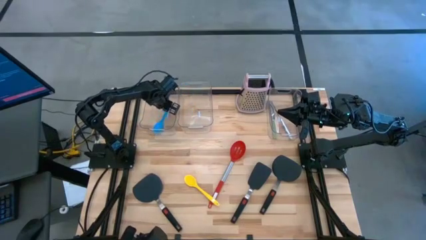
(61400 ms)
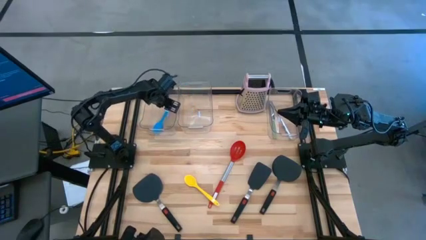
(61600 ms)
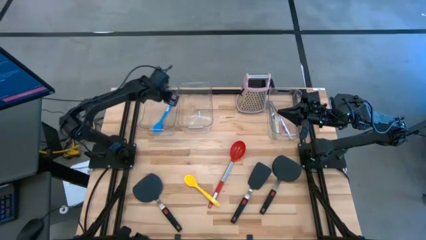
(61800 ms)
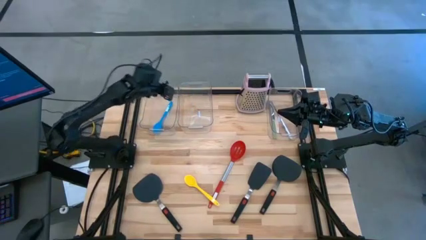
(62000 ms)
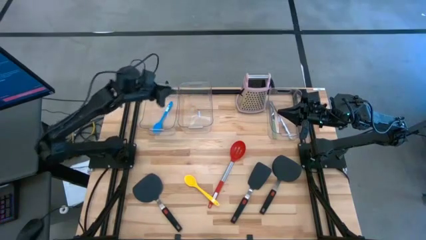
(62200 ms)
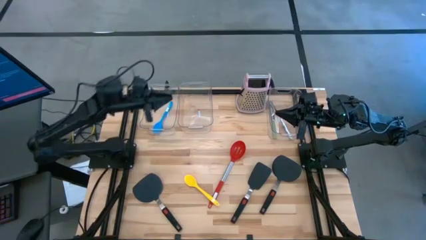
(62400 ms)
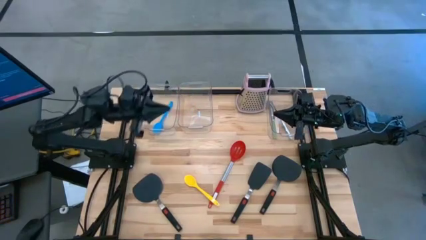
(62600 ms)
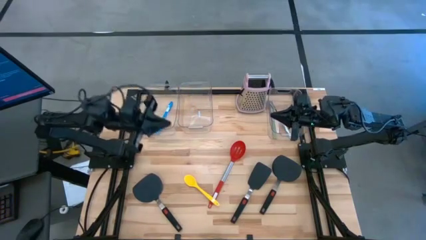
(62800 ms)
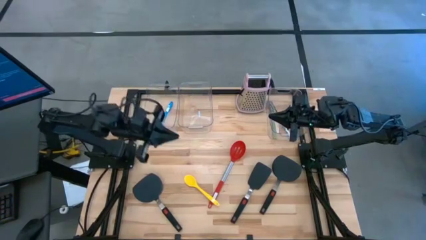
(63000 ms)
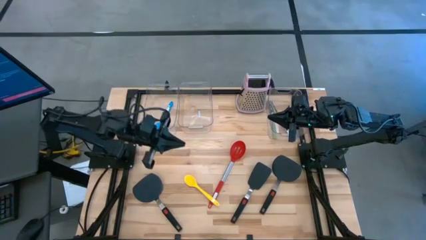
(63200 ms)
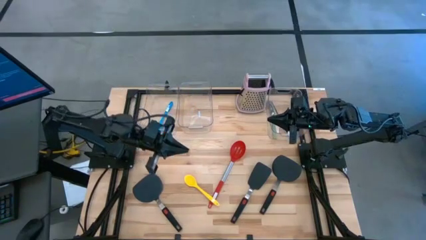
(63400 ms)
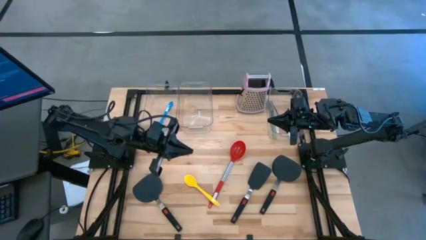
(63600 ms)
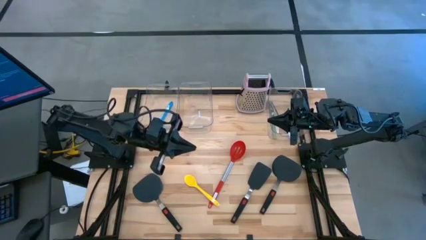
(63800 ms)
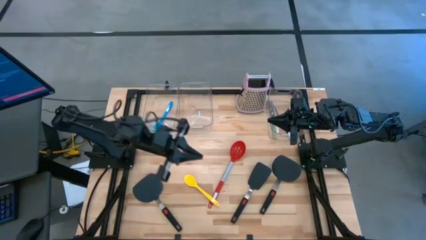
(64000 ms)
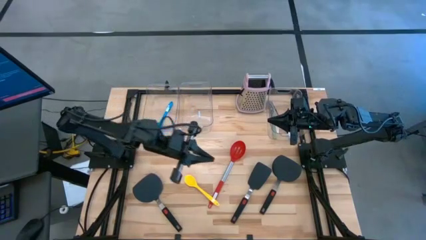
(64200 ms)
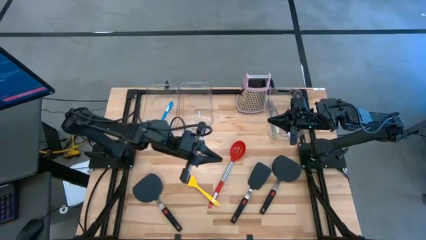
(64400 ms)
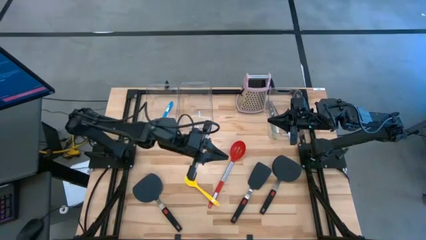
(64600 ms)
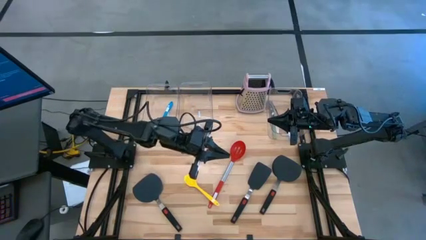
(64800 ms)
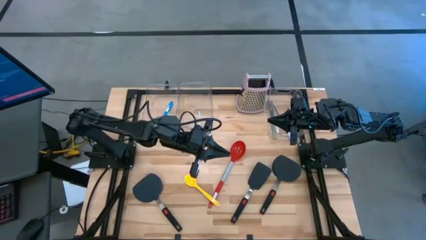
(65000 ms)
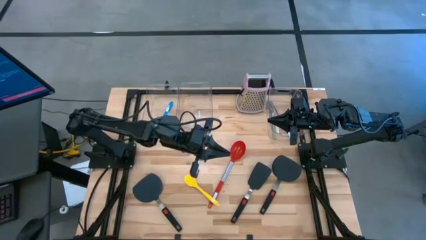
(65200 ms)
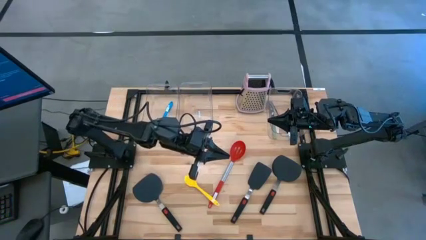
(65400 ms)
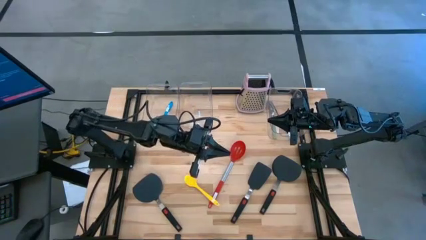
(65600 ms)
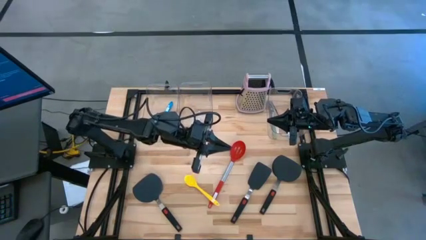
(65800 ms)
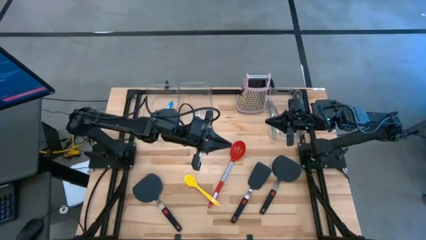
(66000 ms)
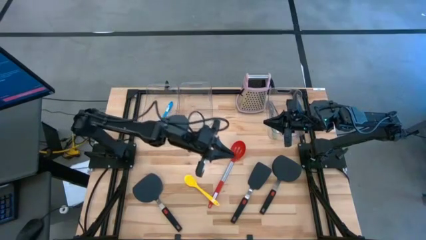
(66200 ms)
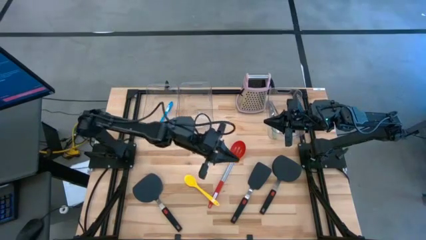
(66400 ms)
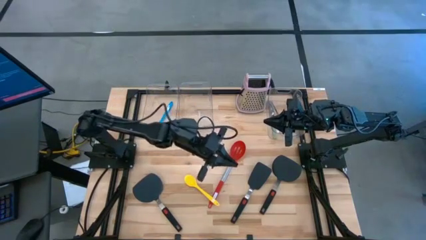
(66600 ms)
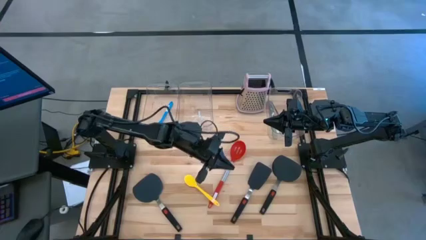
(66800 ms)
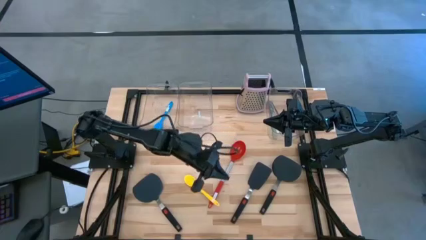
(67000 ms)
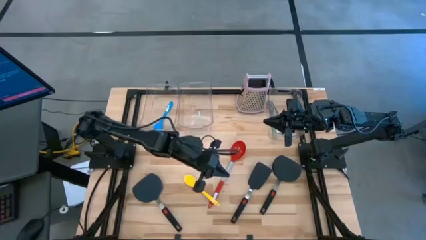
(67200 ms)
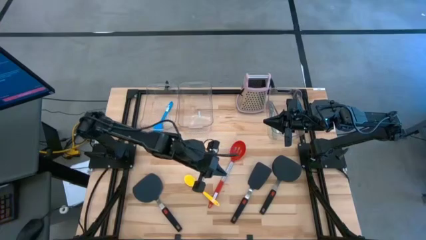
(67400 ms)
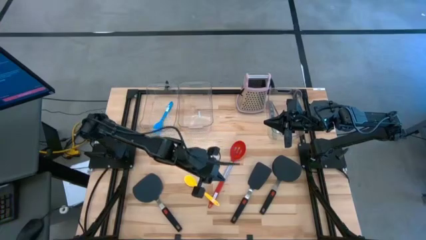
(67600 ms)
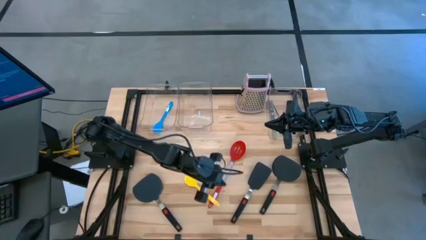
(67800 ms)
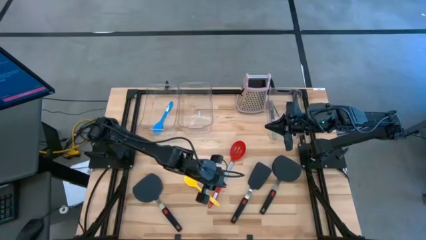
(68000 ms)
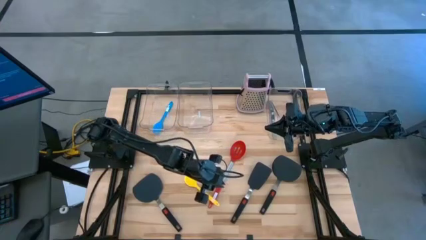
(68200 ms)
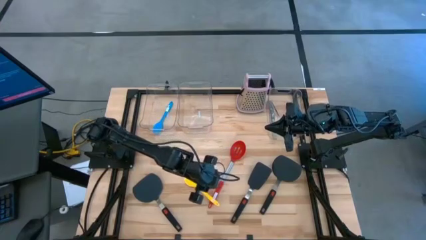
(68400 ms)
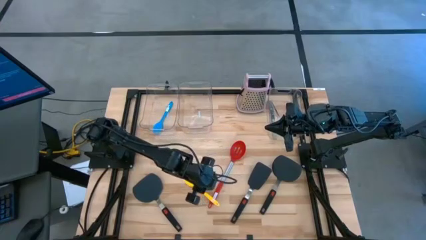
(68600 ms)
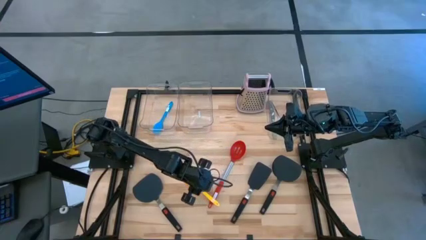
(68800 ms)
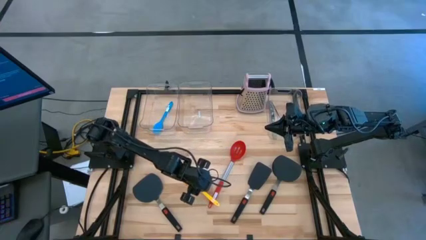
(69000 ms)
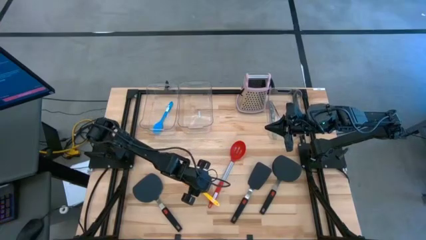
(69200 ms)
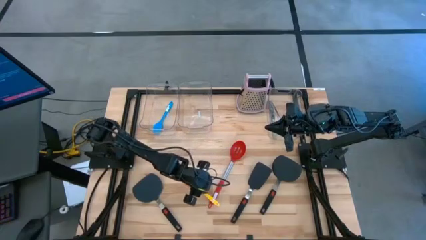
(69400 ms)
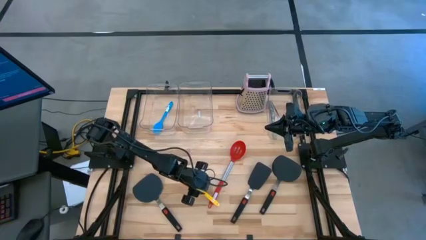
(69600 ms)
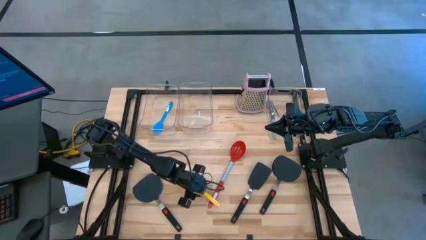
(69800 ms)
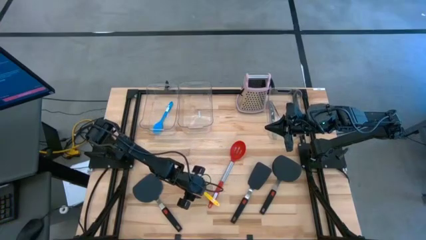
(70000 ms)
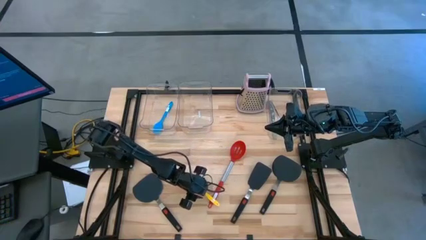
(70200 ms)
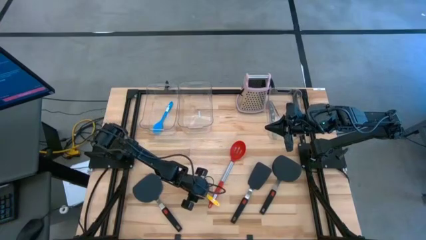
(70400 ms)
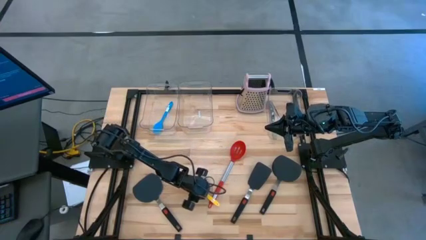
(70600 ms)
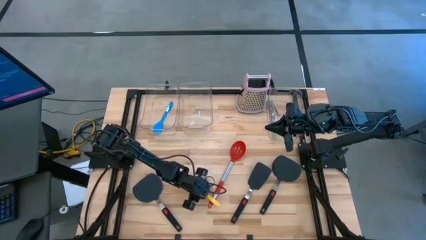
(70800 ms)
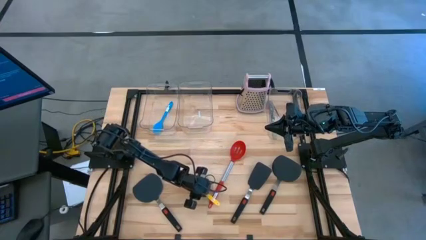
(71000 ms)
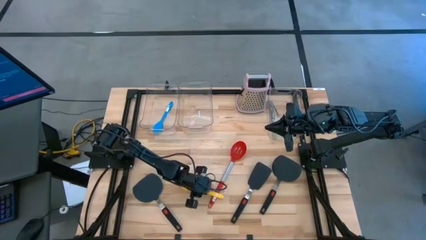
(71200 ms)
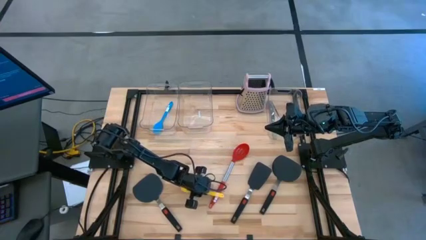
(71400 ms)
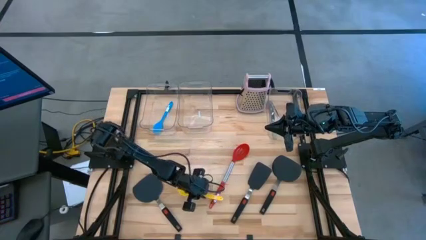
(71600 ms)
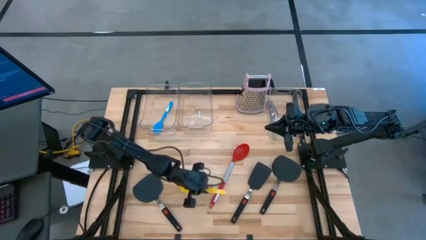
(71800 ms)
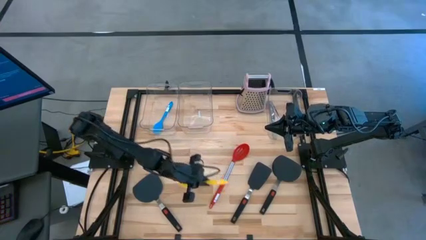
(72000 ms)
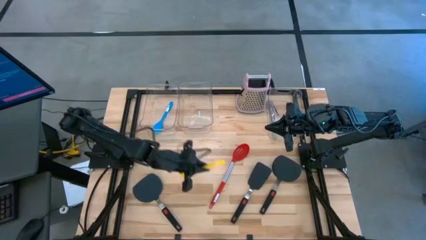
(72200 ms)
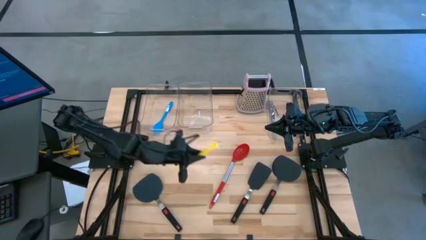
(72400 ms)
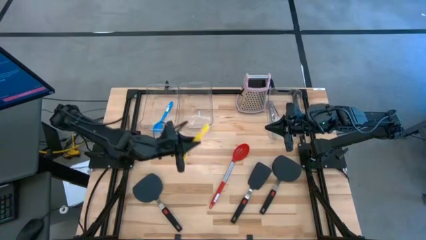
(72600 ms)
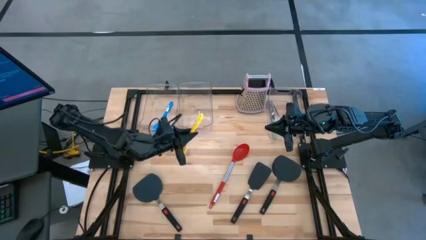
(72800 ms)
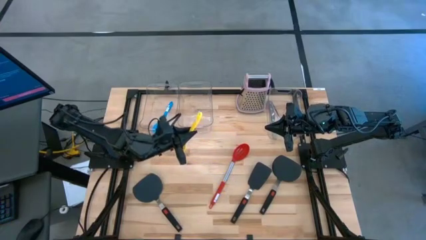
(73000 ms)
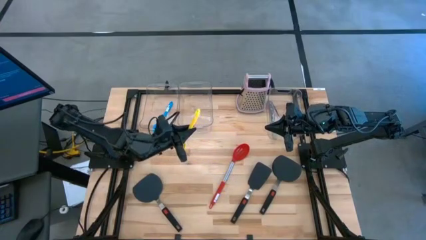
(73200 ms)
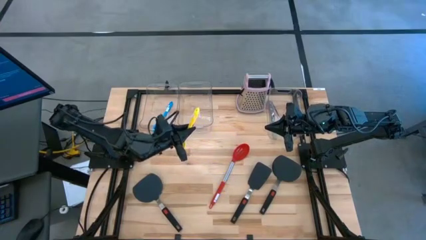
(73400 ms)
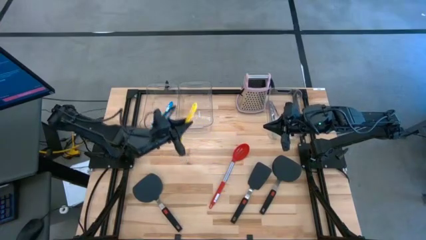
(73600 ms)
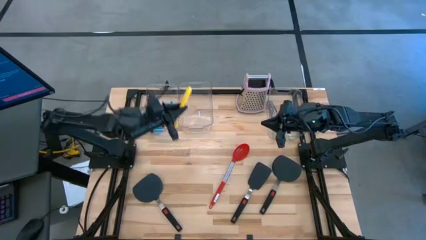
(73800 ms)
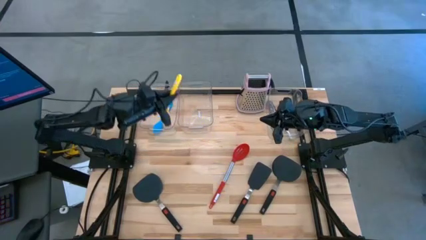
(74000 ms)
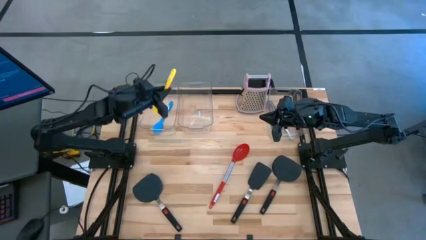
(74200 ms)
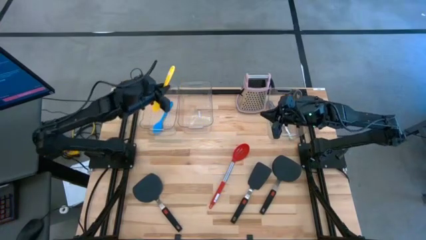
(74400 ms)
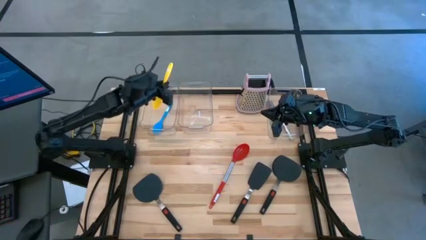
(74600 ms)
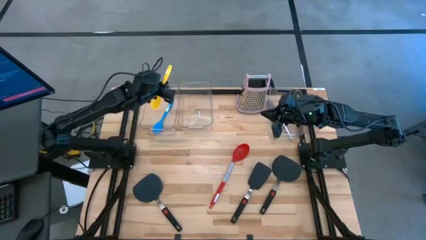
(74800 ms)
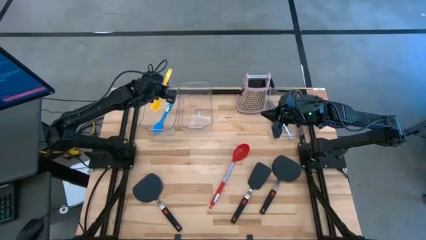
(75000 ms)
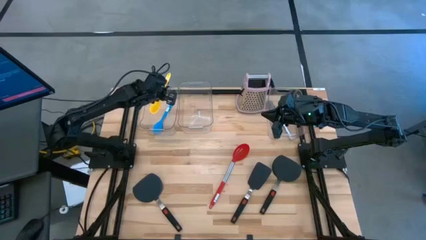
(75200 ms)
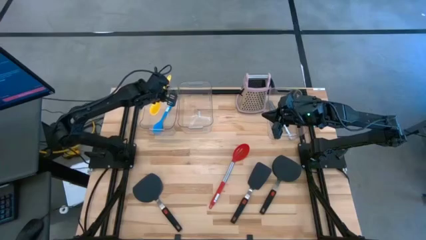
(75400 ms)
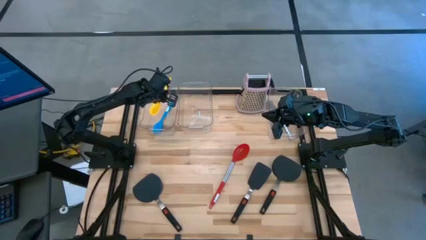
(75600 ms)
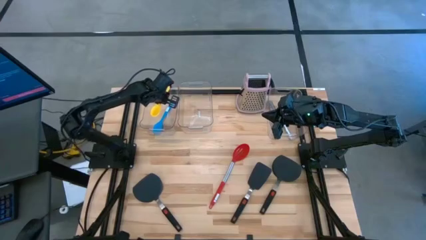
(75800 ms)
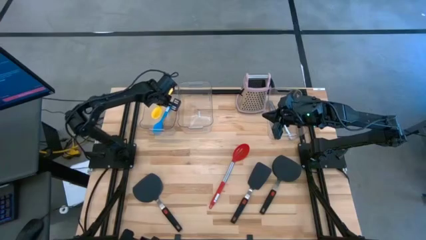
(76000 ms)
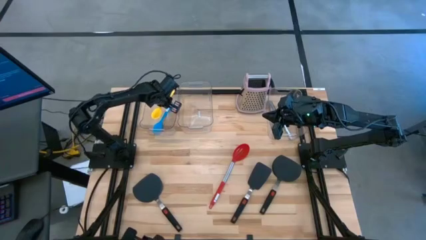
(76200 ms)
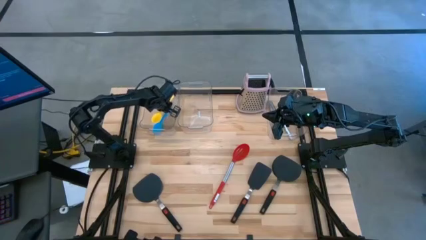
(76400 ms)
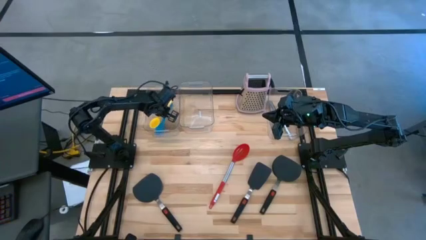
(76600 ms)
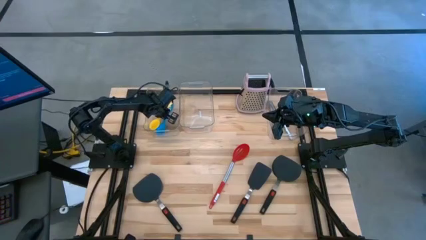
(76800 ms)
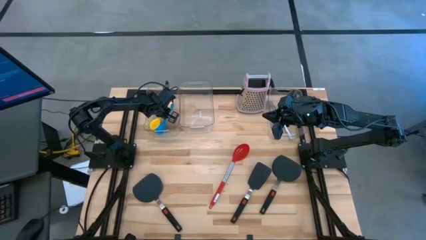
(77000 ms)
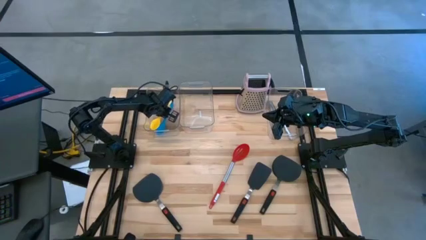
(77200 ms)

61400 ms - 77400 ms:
Task: Pick & Place Kitchen Items
Put the yellow serving spoon into the left transparent bin
